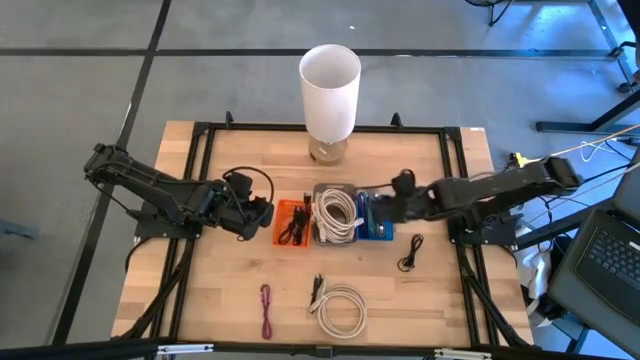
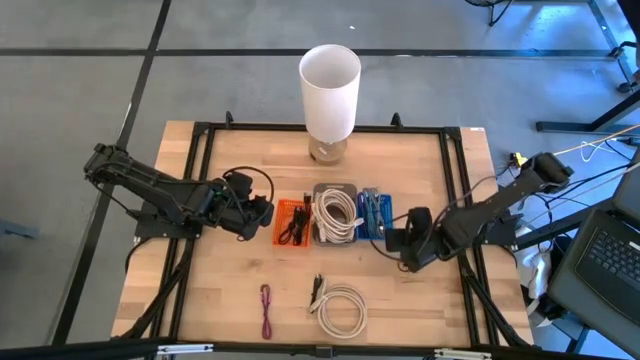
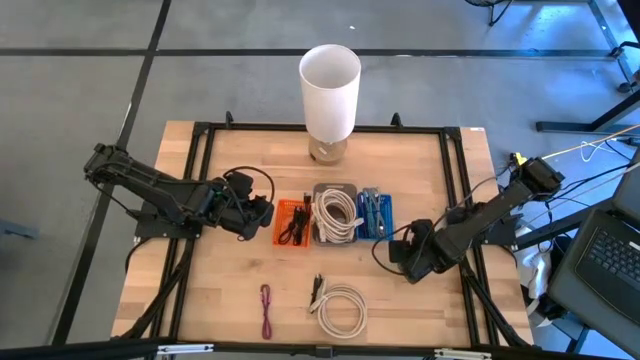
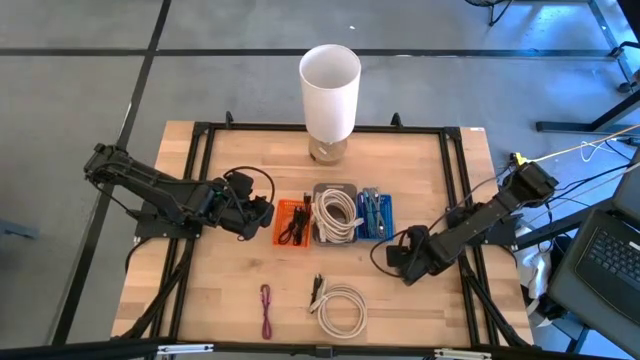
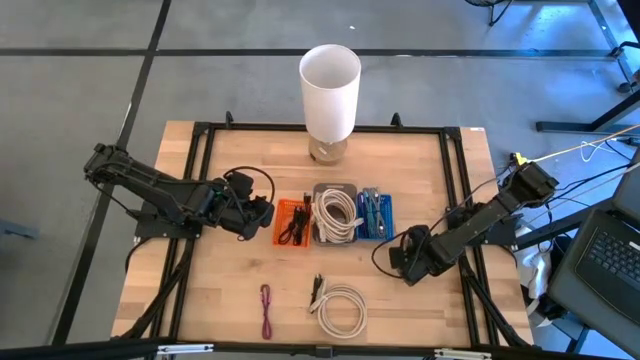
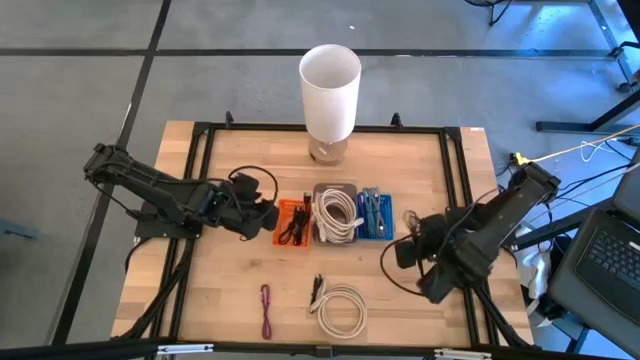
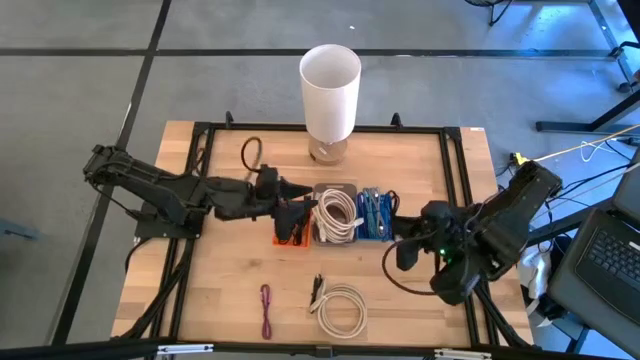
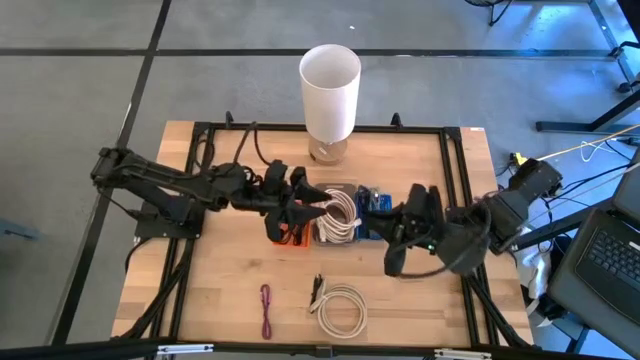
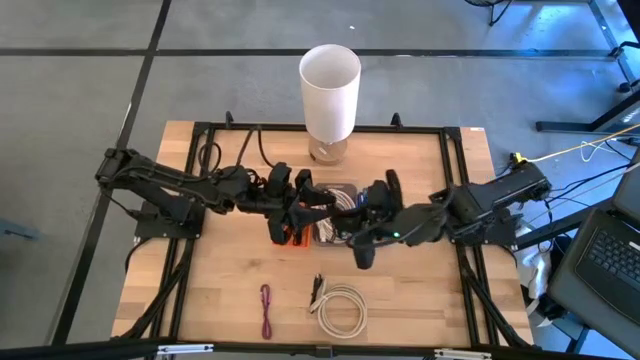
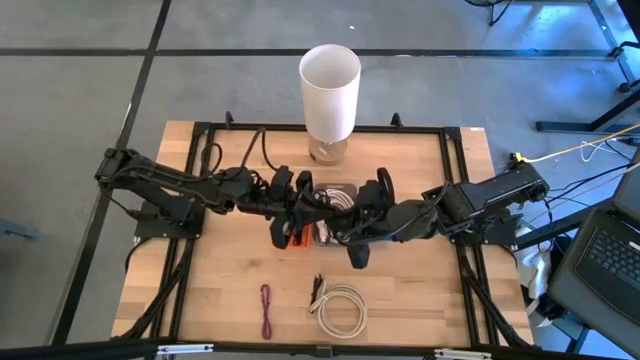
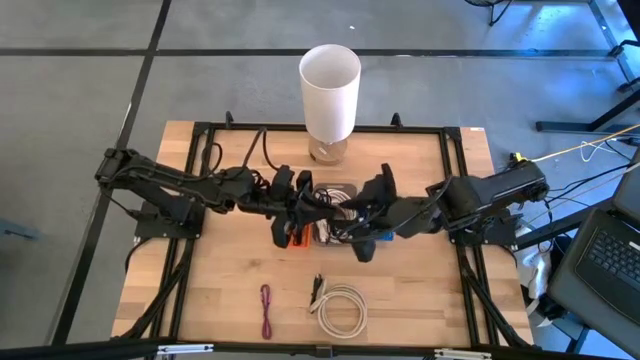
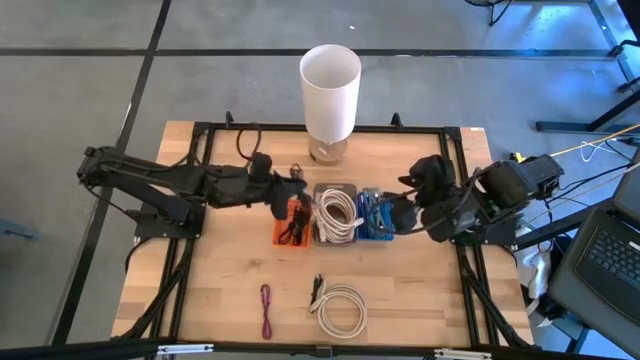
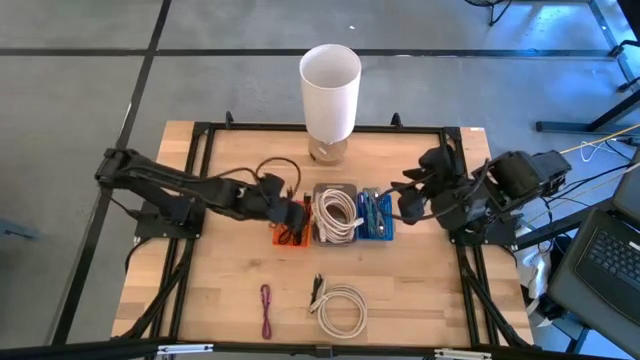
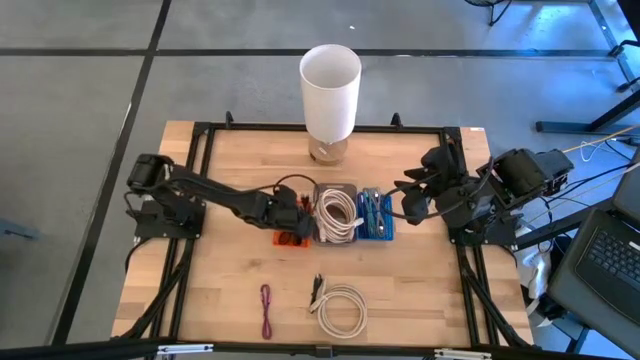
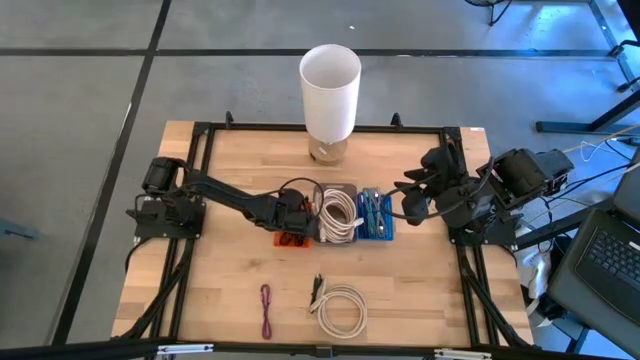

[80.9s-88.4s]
Task: Pick & Place USB Port
Put the black charger cable into the orange bin

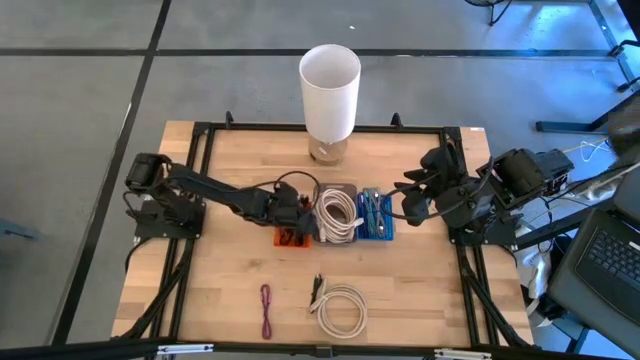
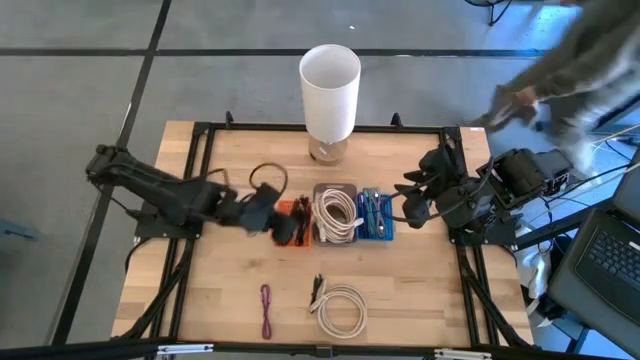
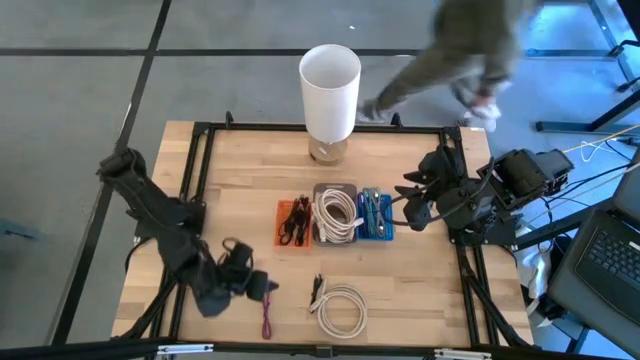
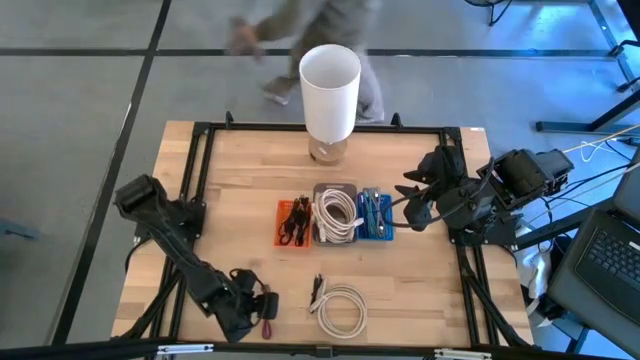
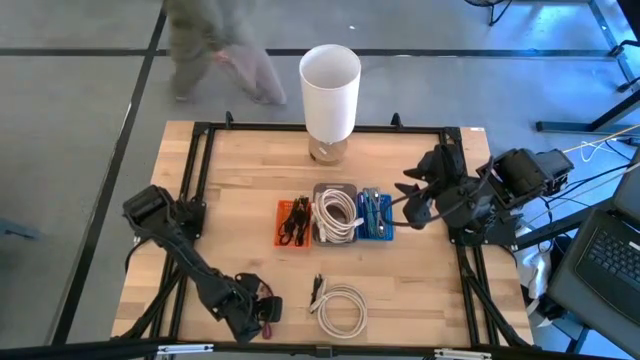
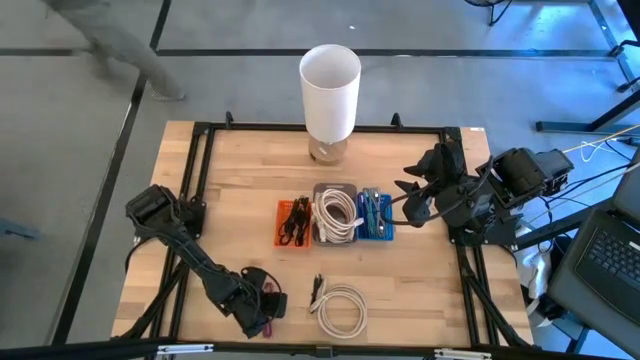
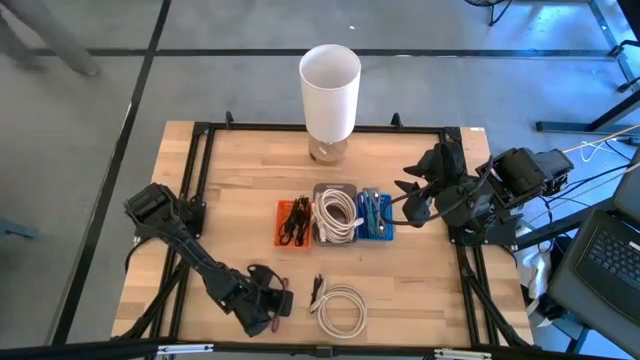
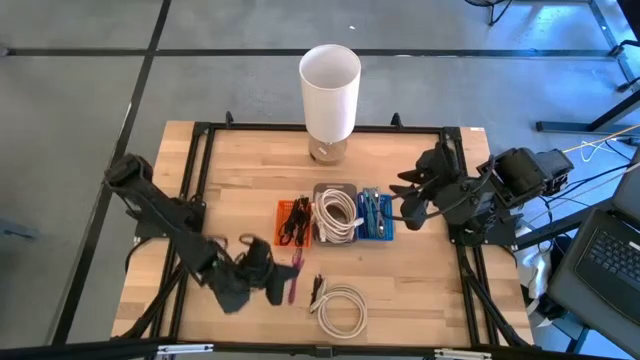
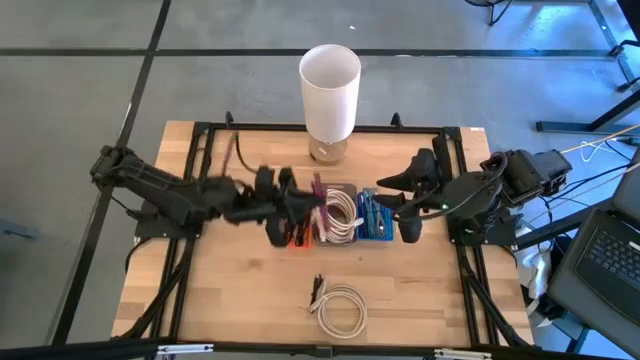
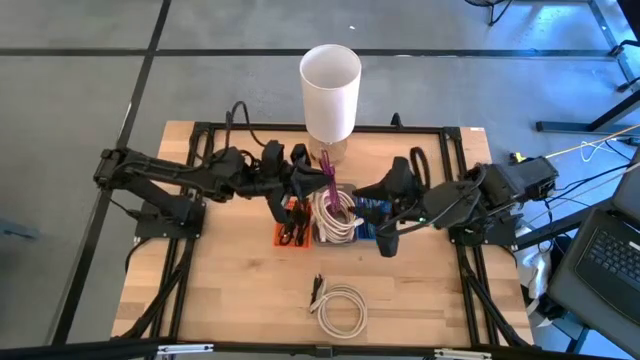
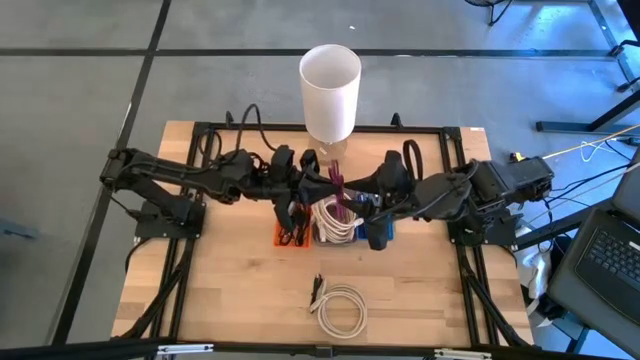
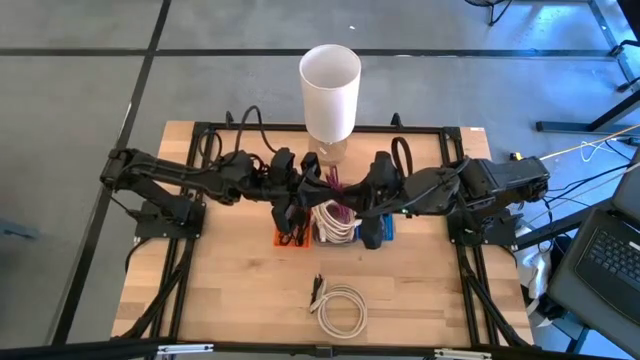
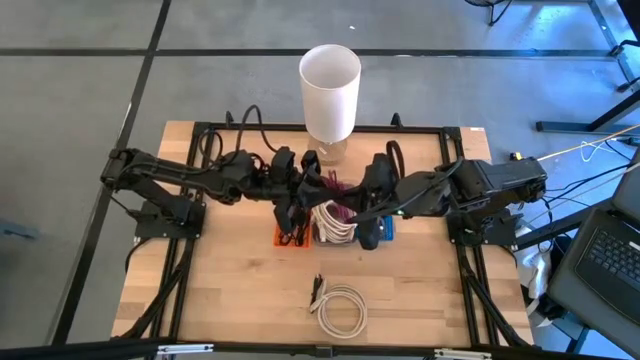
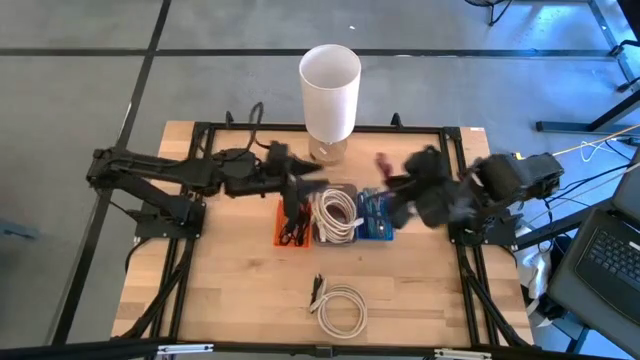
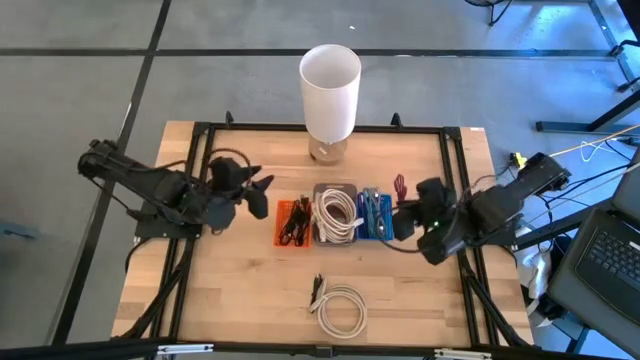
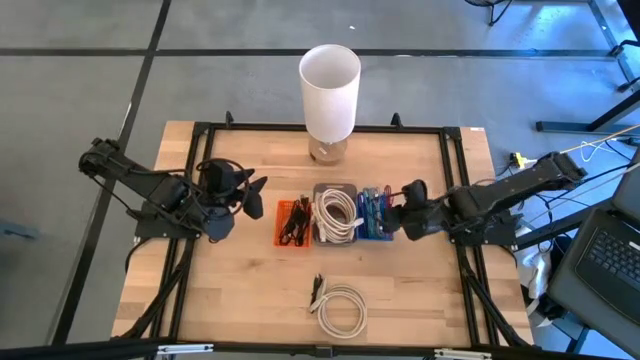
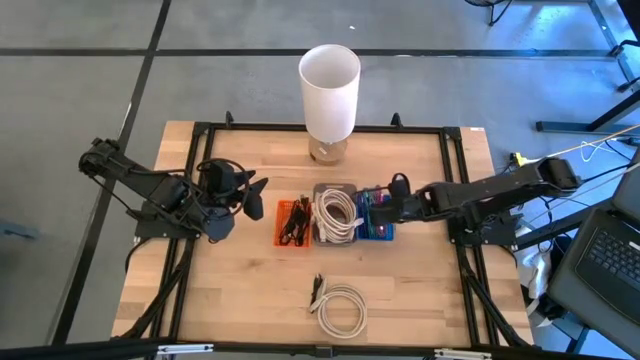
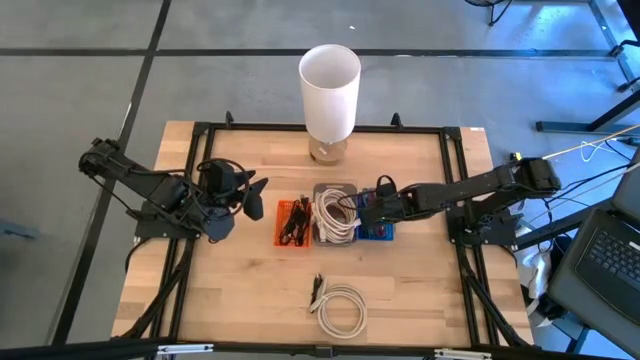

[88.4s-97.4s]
Put the pink charger cable into the blue bin

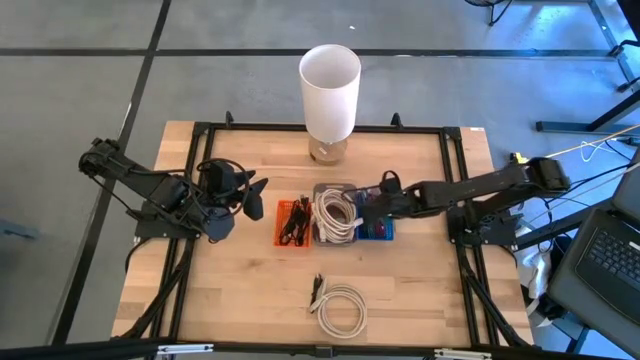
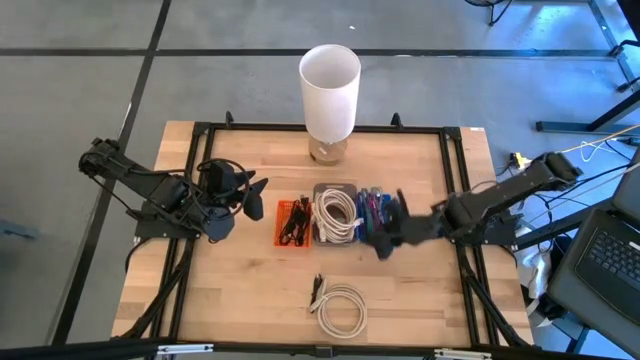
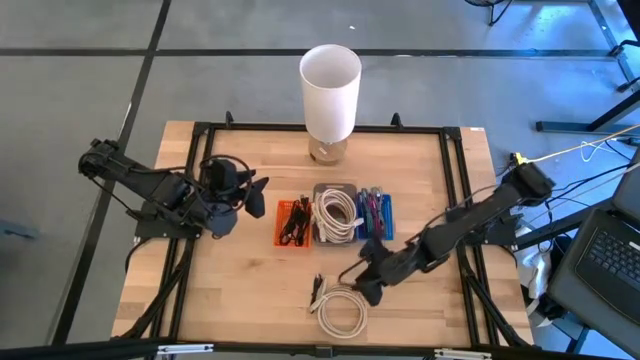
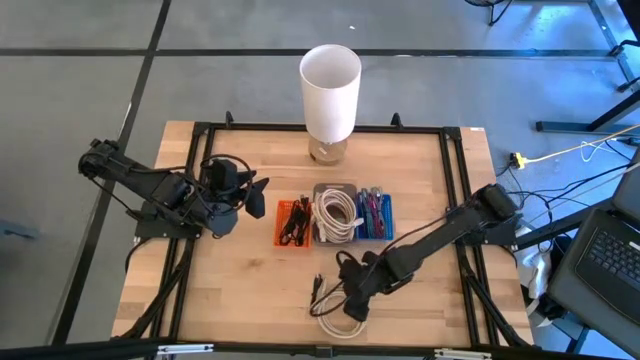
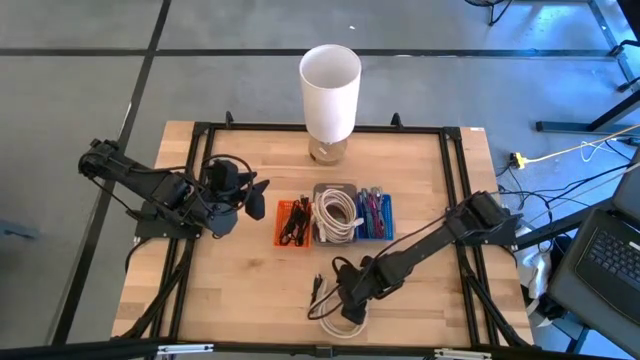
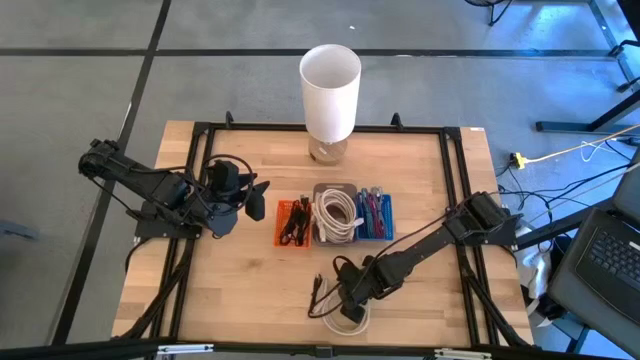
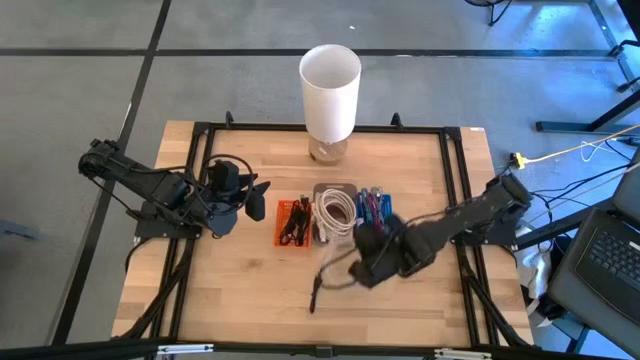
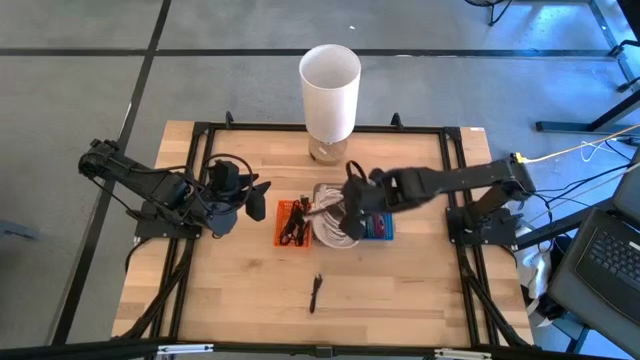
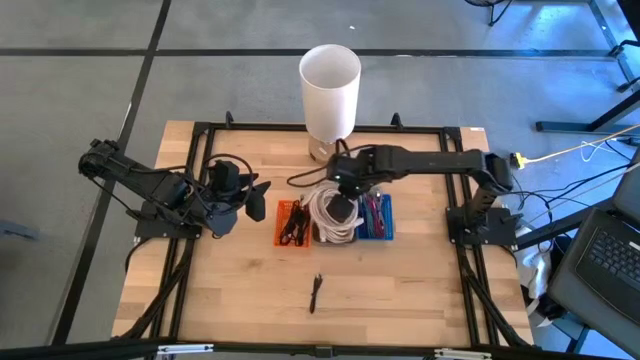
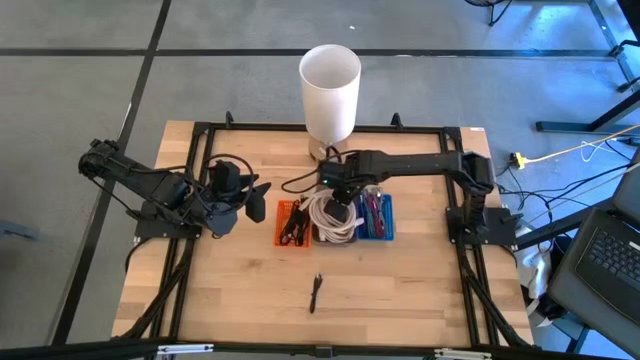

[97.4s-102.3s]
Put the brown HDMI cable into the black bin
